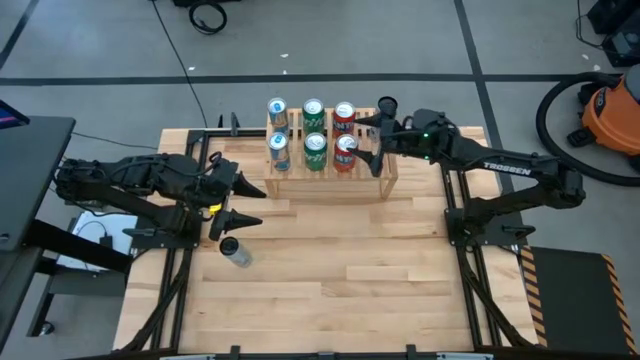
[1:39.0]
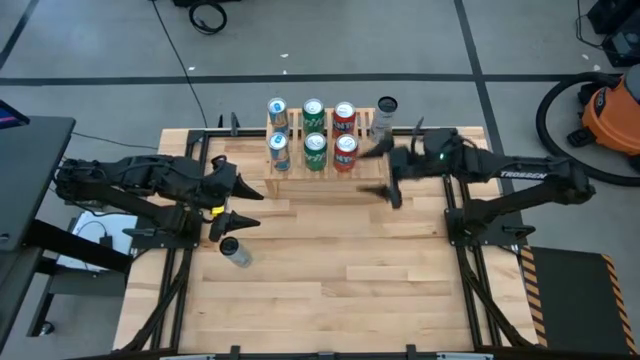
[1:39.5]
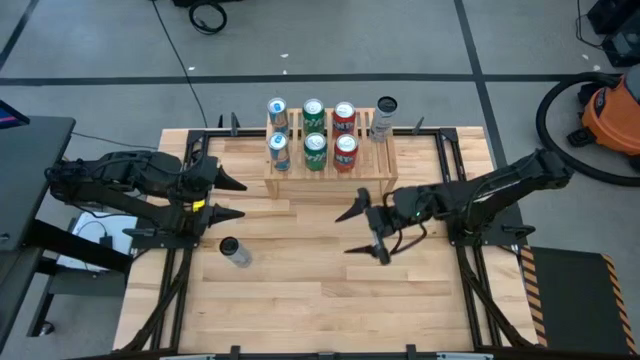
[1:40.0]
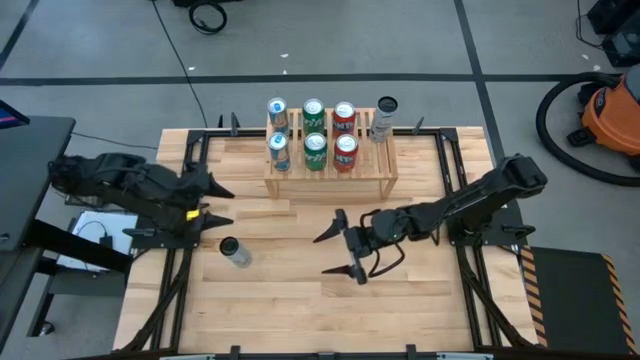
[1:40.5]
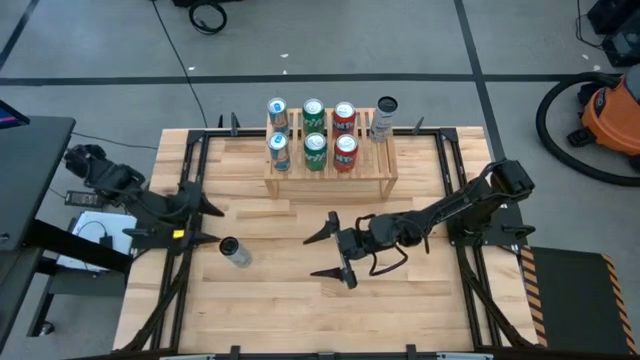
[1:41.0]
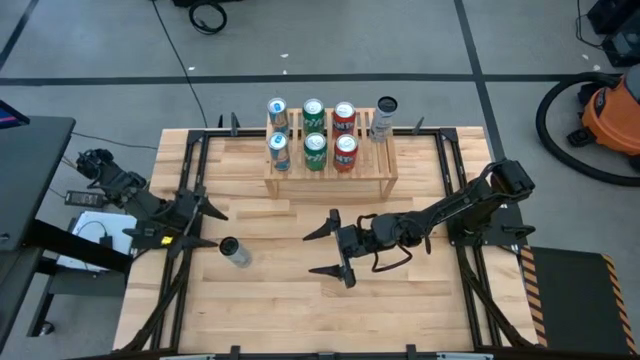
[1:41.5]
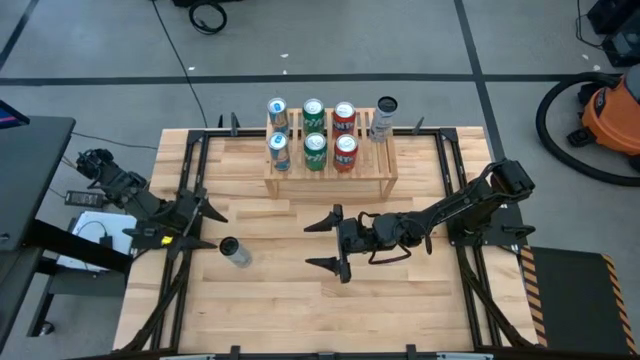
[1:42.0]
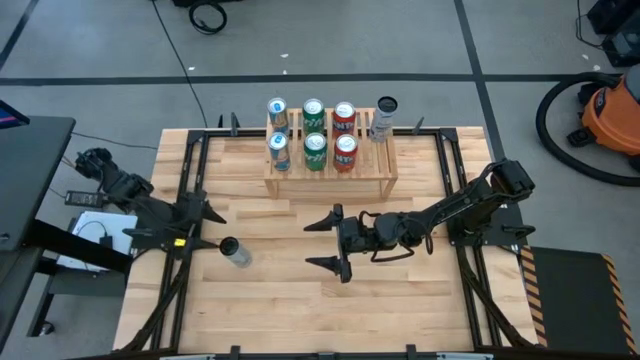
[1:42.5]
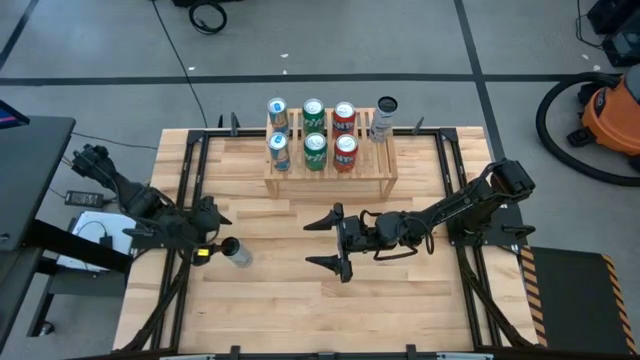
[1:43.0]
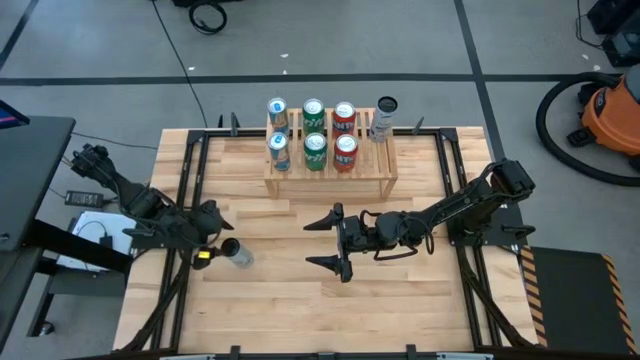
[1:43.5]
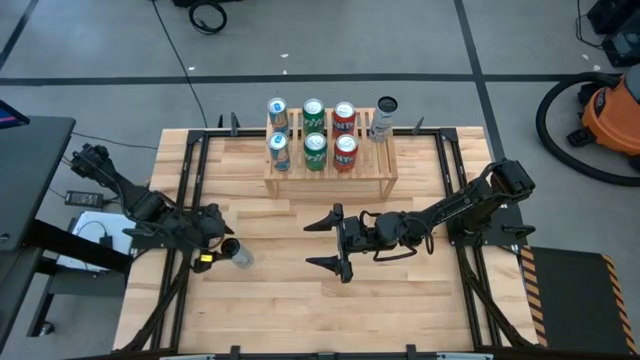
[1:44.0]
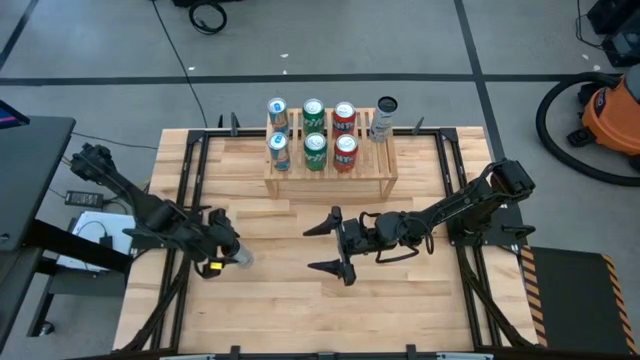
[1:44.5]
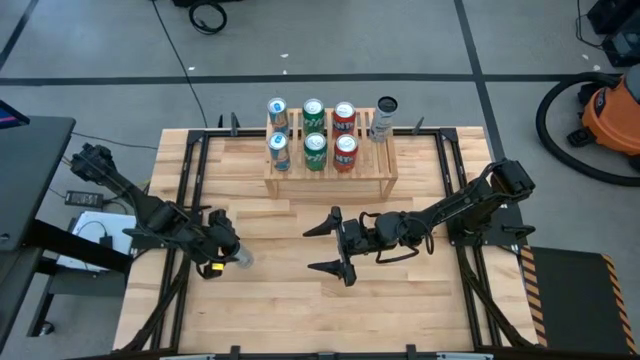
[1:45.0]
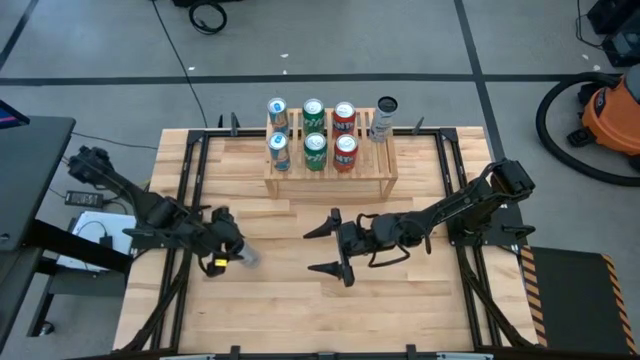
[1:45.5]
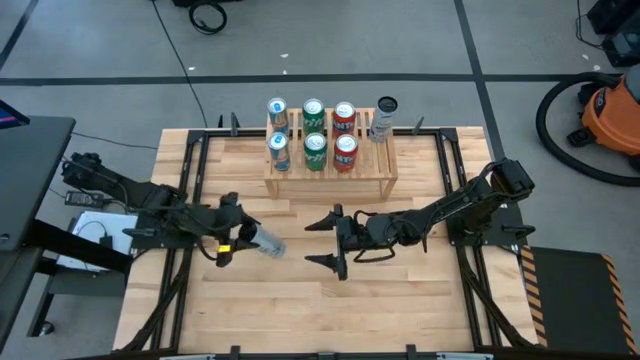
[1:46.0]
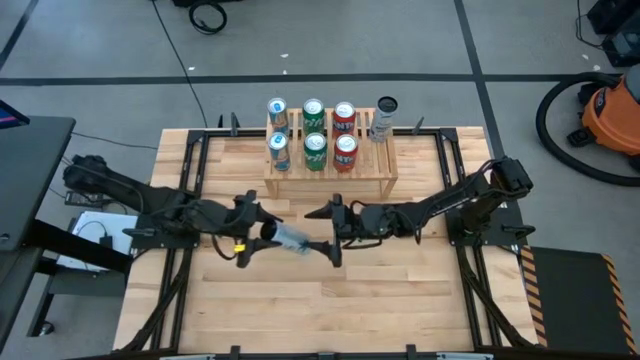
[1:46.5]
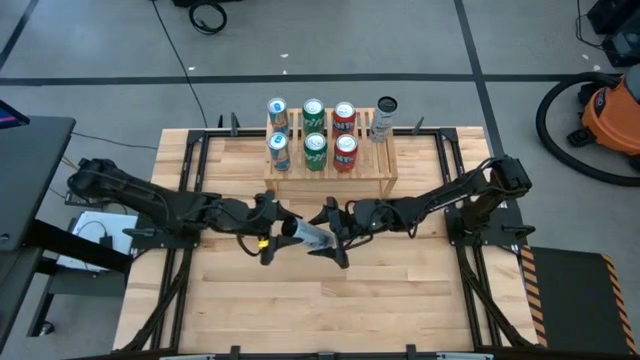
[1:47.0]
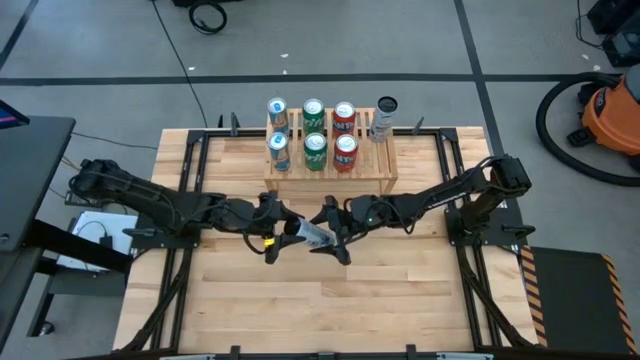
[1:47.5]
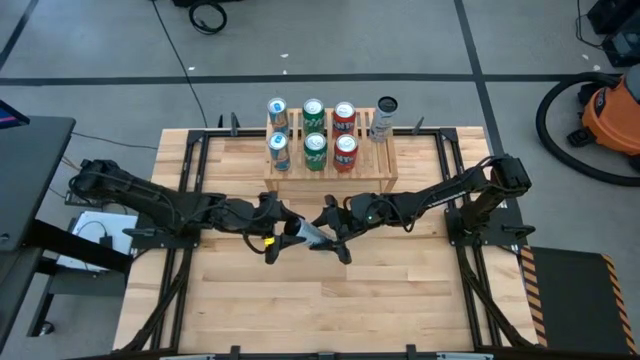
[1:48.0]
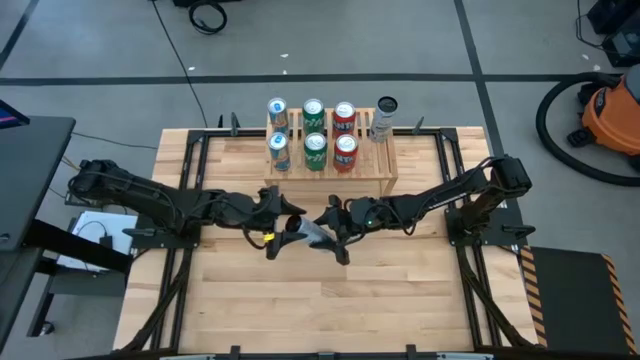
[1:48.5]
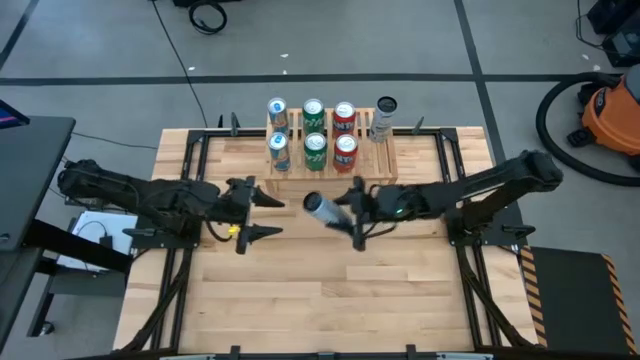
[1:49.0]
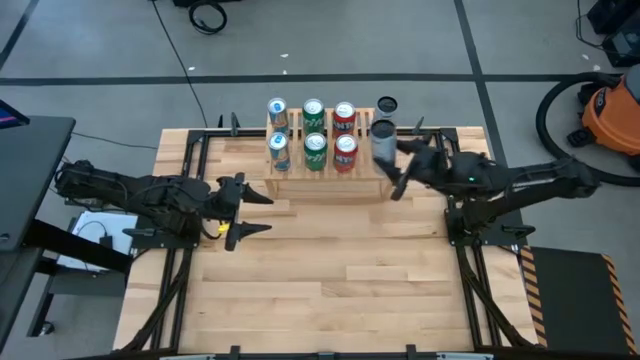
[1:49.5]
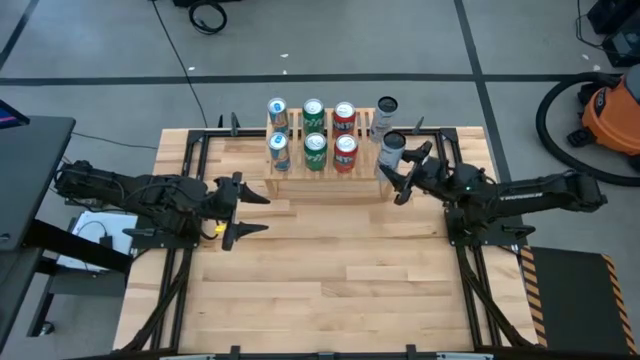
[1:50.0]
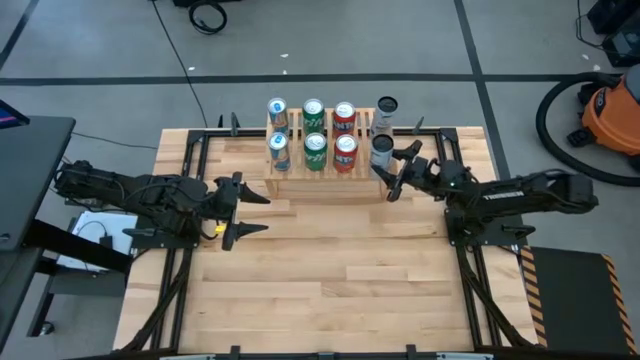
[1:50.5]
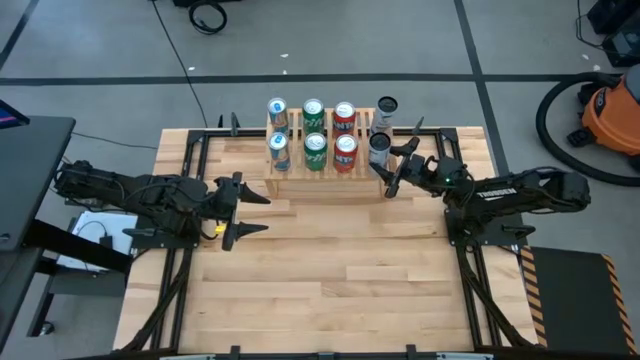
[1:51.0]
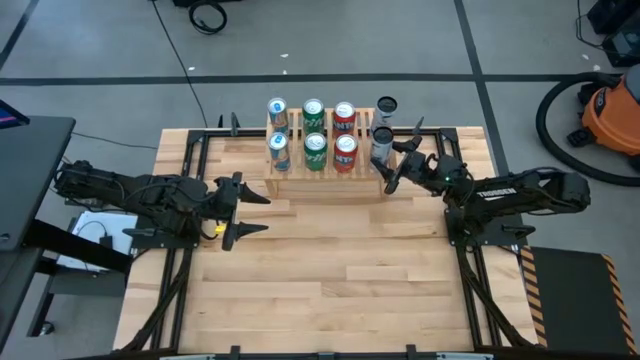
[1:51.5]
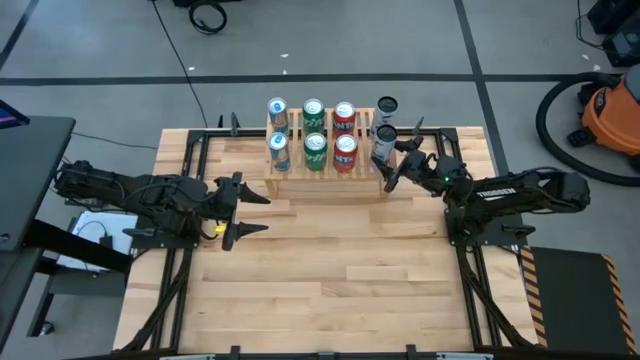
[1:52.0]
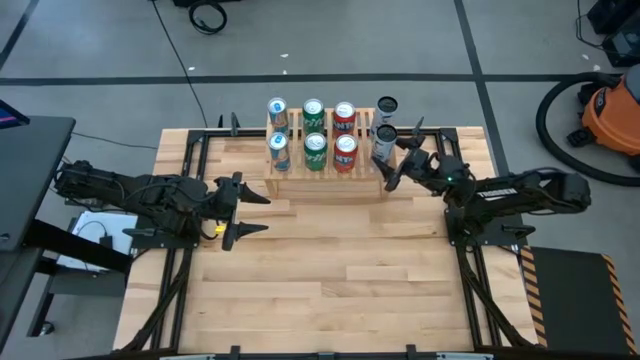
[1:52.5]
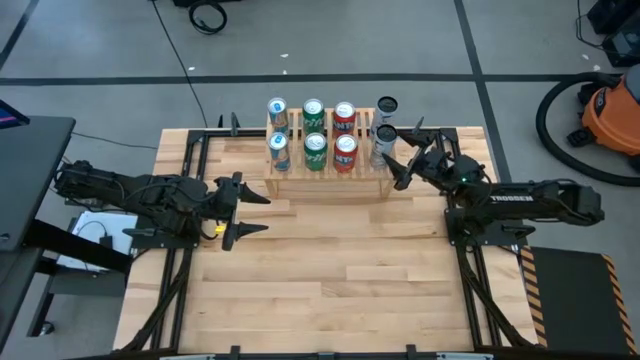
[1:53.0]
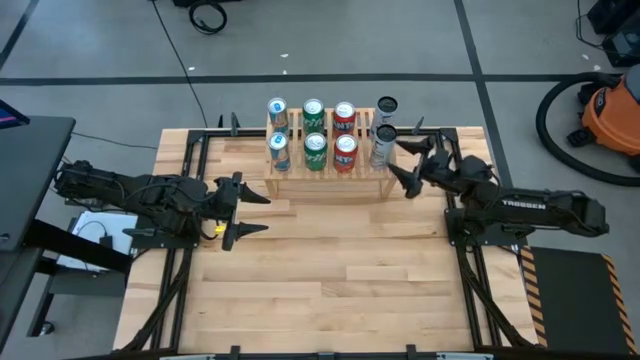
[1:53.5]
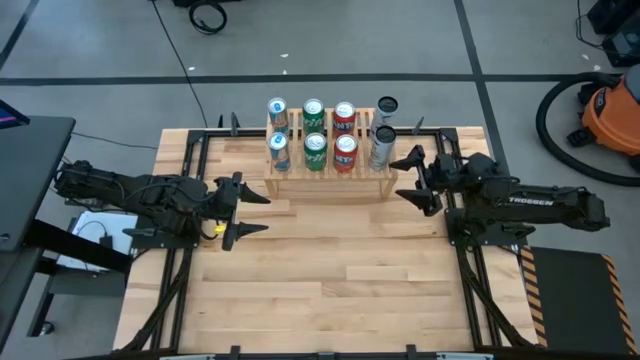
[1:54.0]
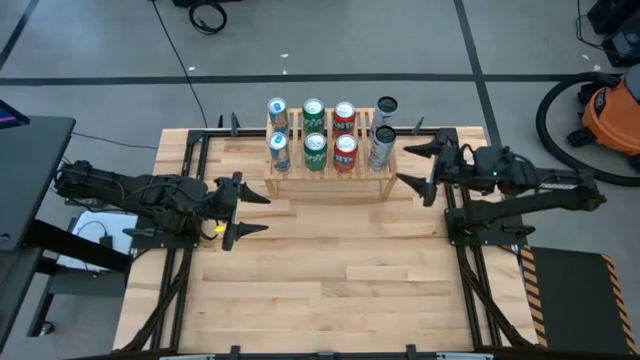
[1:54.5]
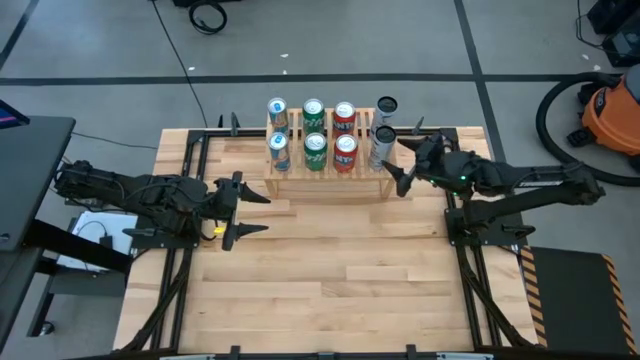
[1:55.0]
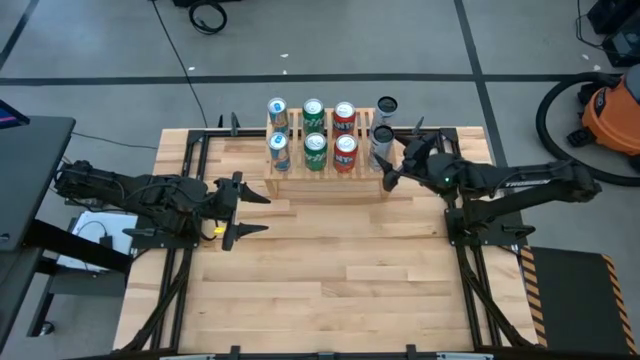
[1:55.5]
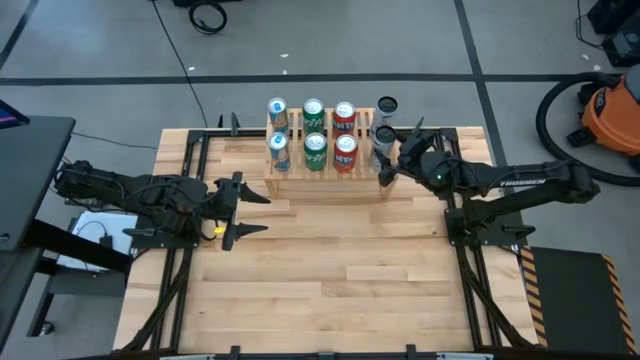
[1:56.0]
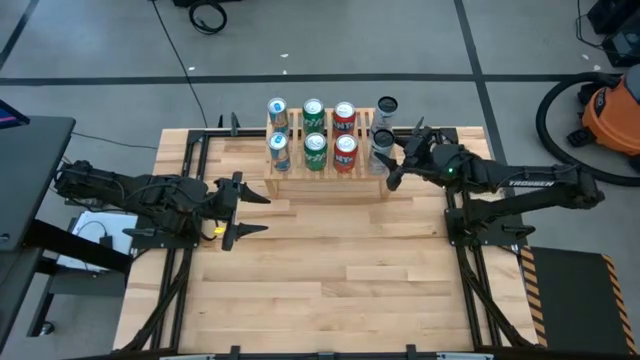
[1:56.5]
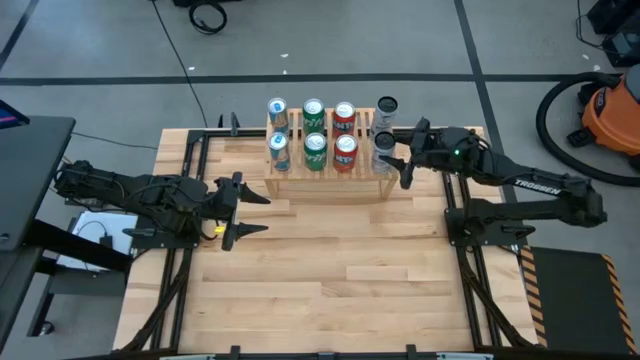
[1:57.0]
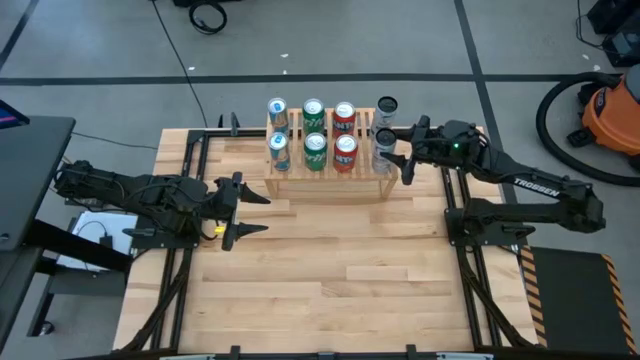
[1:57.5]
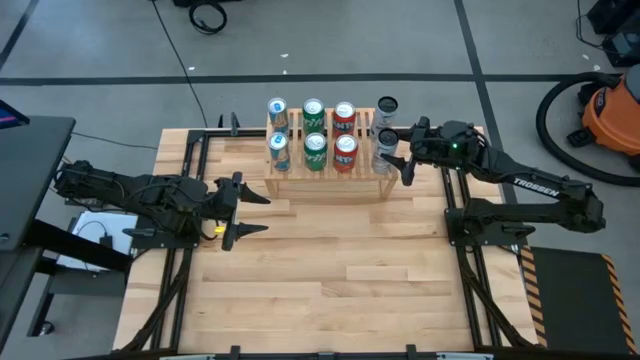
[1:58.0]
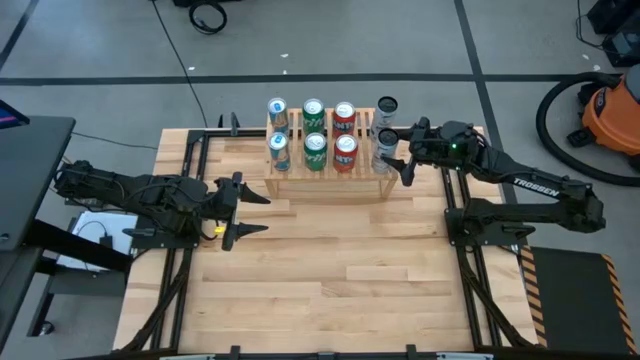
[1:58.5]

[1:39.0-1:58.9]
Task: Place canned beverage on shelf
Align the white soda can with the other white soda can on the shelf

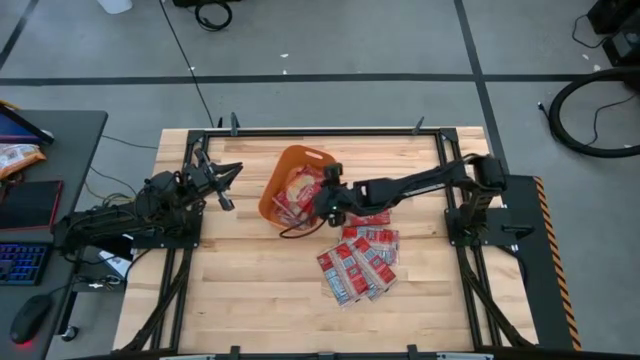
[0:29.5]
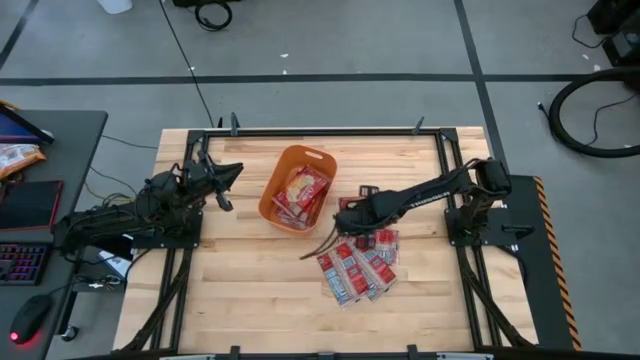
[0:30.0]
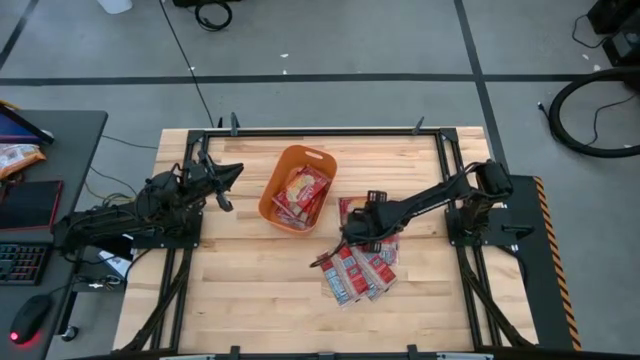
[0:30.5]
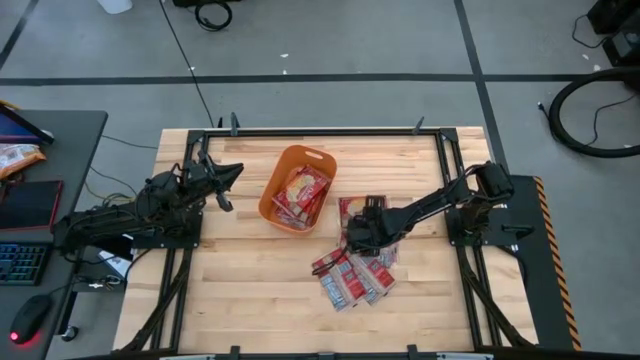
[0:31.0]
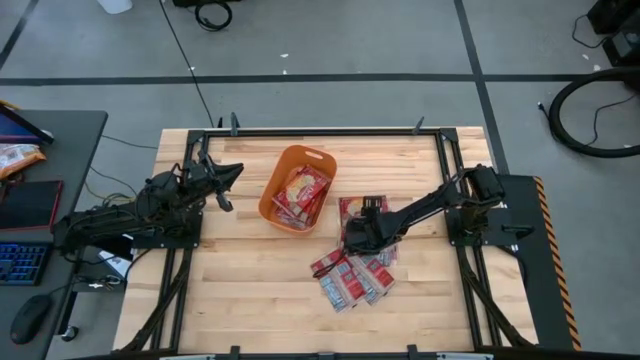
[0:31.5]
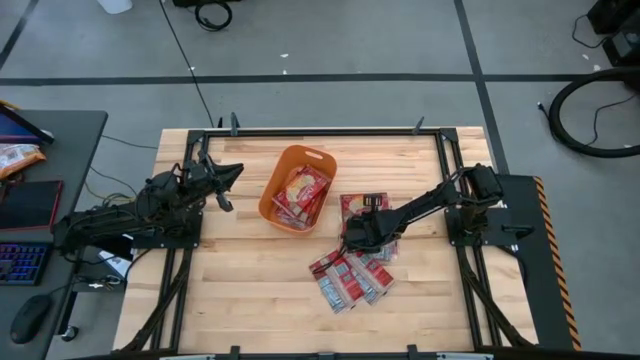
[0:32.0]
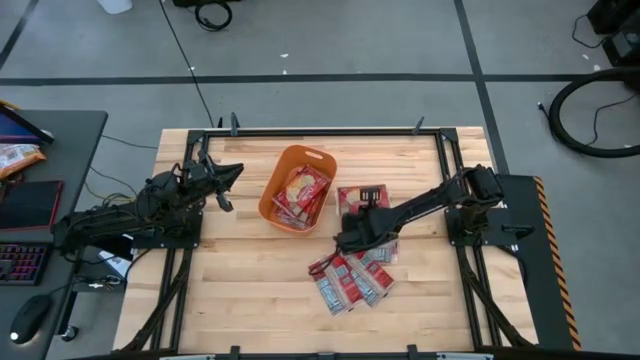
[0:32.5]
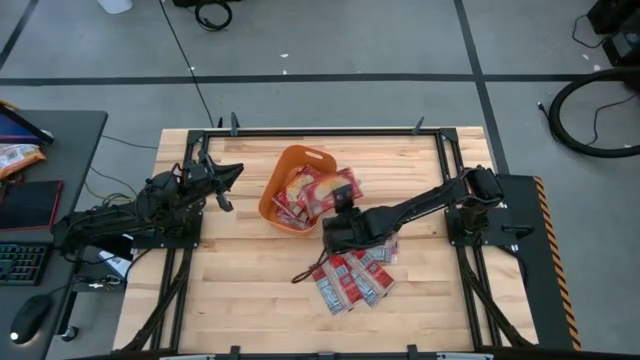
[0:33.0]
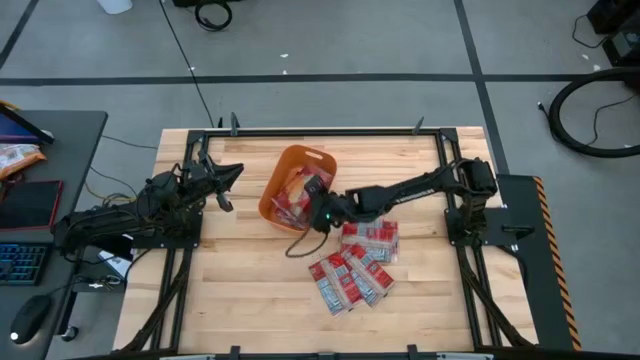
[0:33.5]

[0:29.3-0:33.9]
Task: Sort popcorn bags into baskets
Put the red popcorn pack into the orange bin
